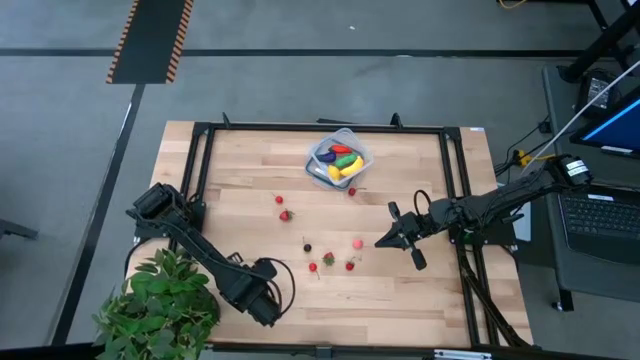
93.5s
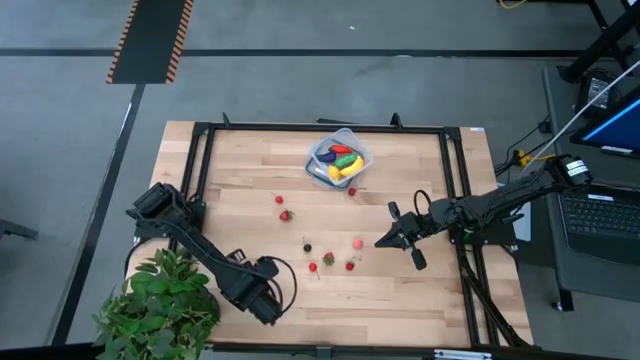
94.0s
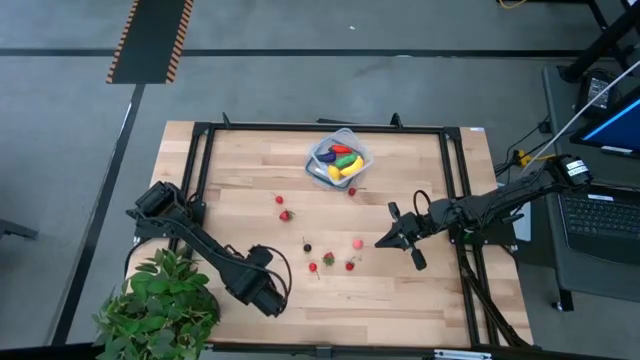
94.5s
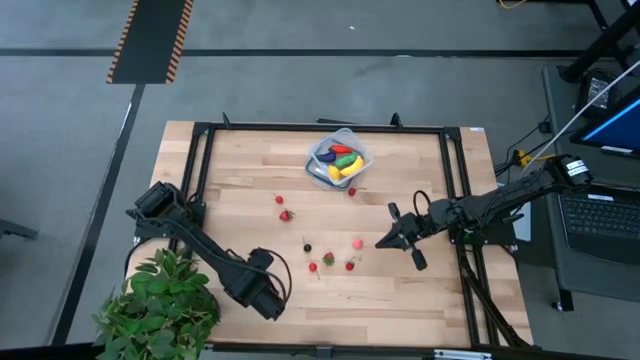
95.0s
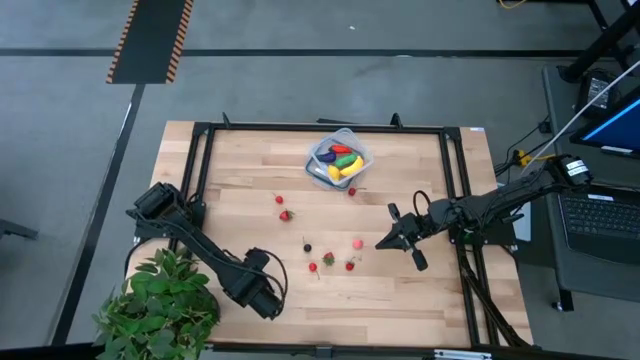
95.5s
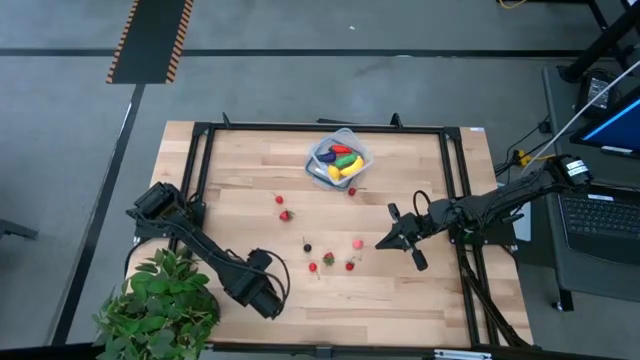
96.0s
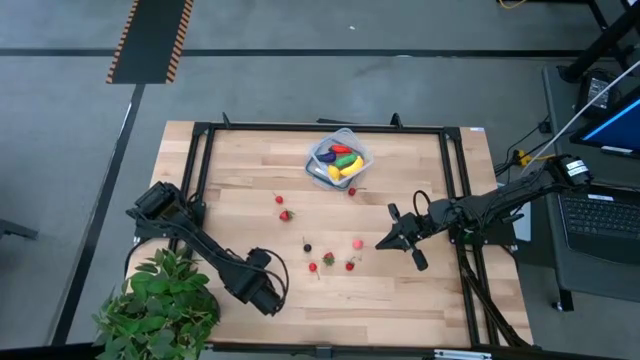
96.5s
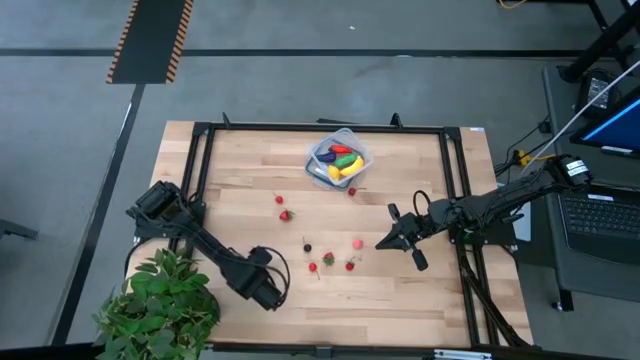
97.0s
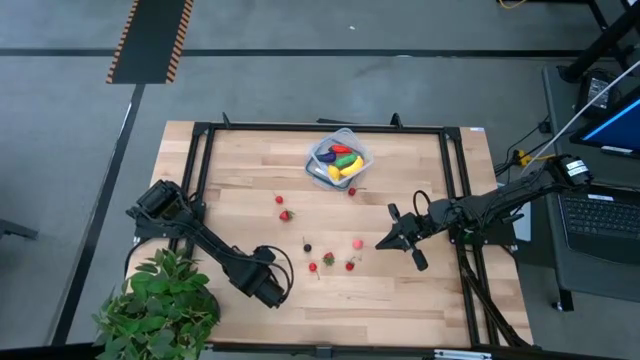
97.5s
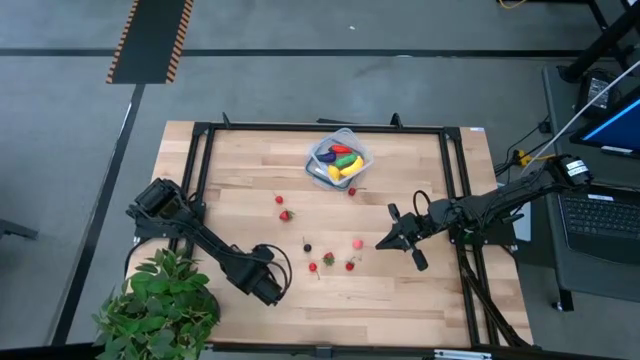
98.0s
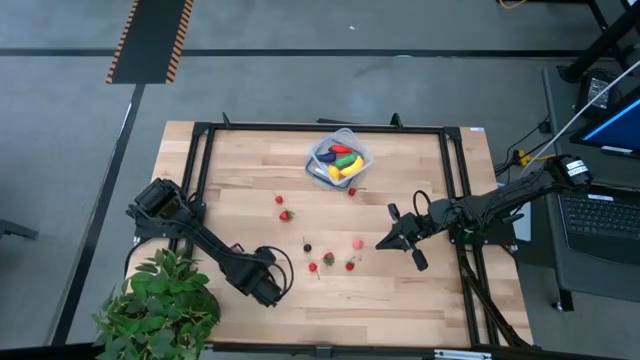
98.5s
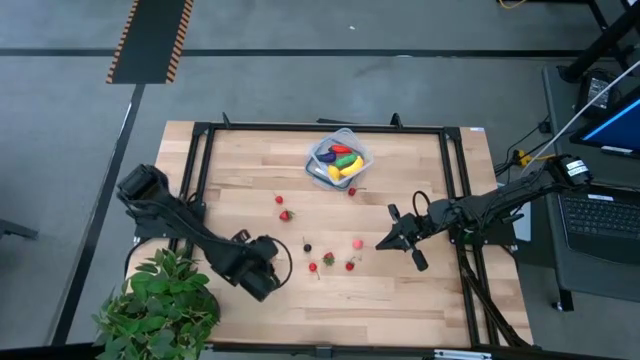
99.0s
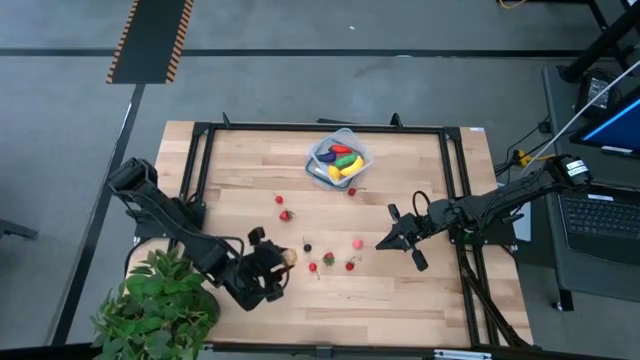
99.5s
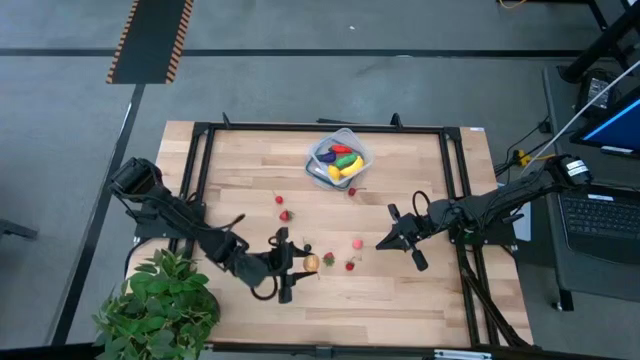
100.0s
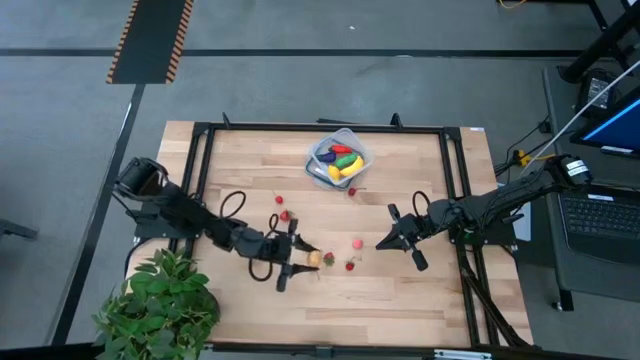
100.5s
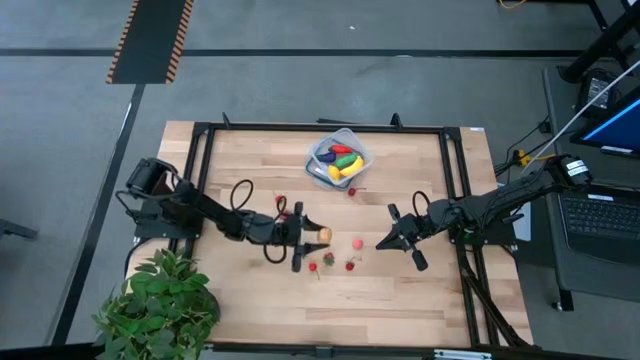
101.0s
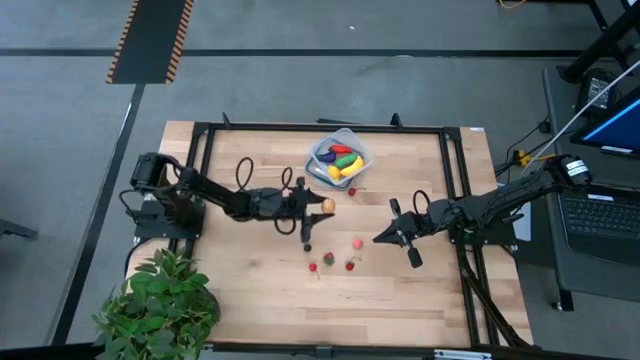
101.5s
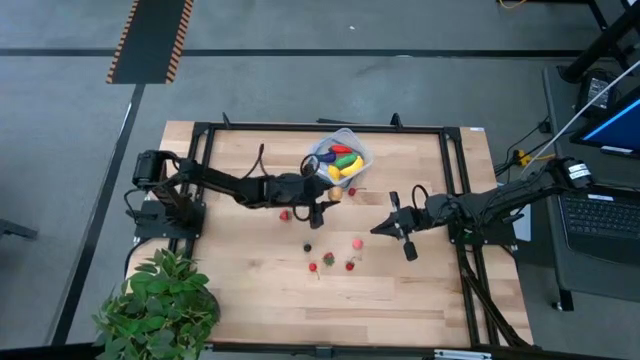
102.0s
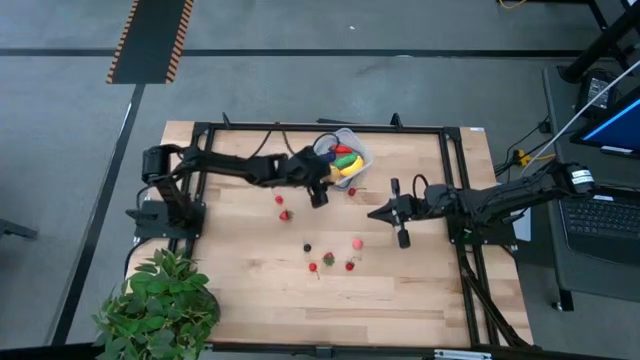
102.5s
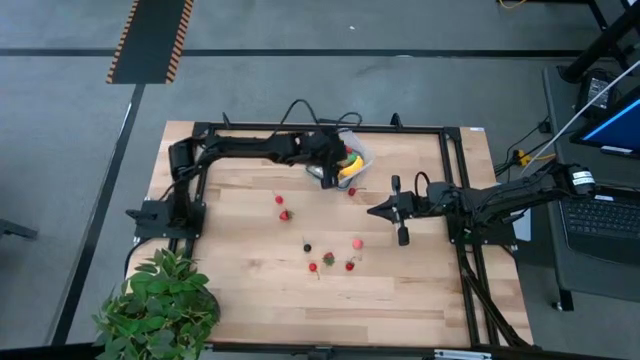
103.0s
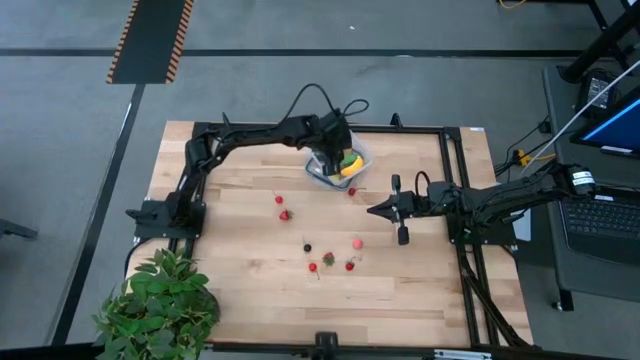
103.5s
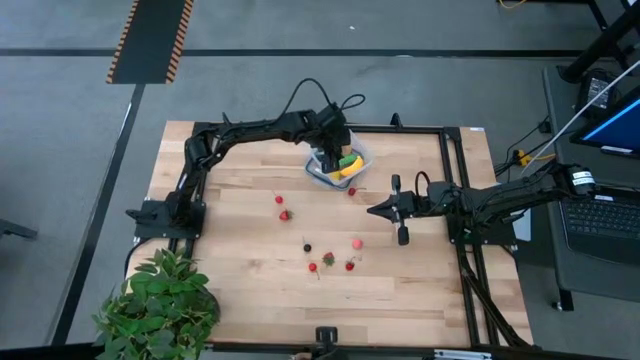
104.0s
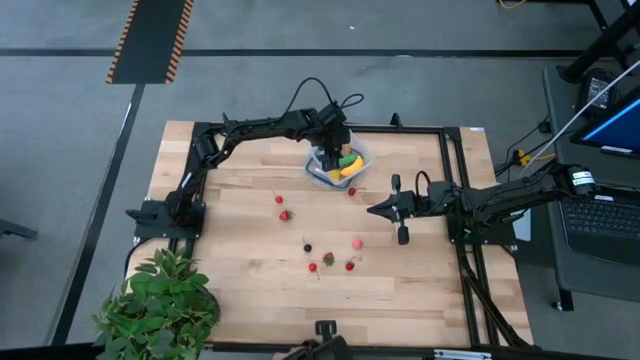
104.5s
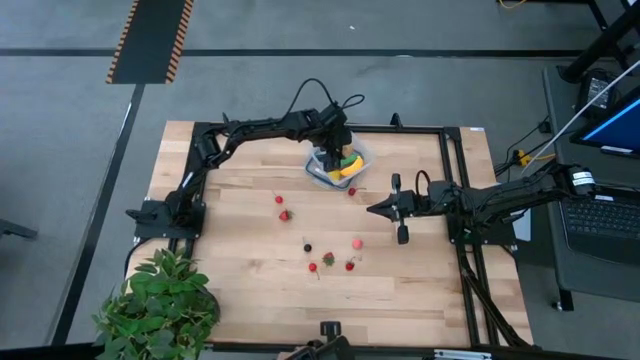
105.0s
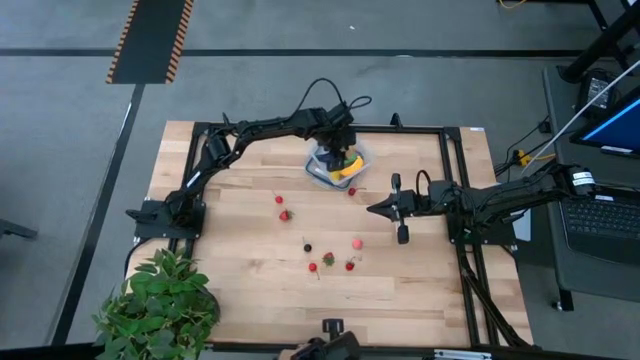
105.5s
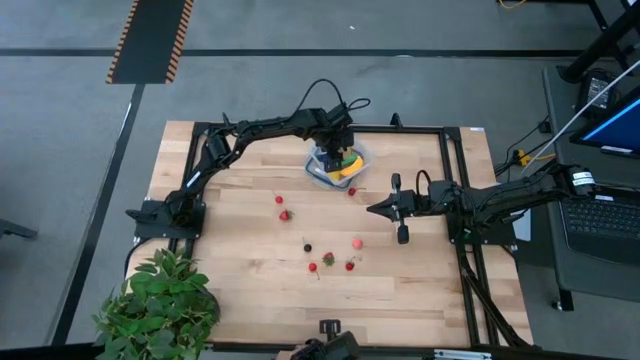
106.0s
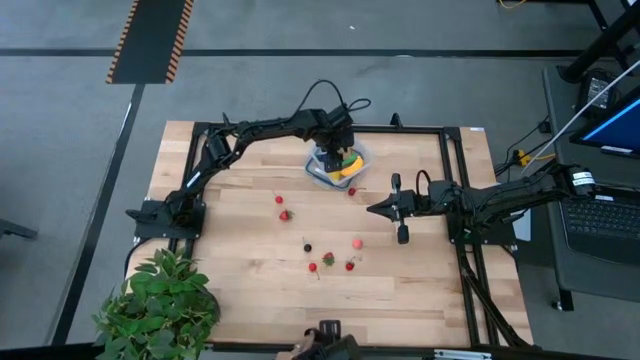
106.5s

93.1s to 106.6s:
Task: Pick and placing Produce into tupperware
Put the brown potato into the transparent container

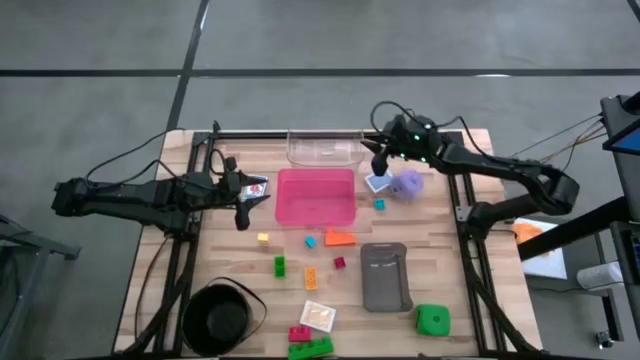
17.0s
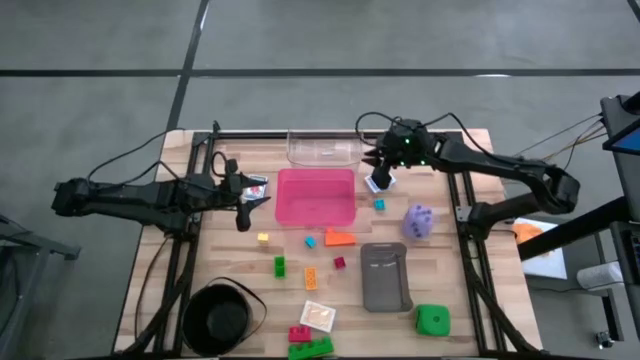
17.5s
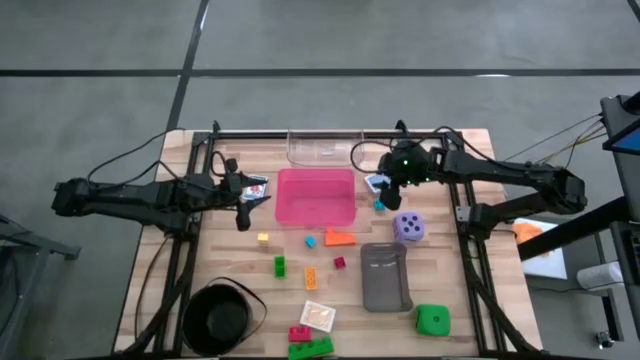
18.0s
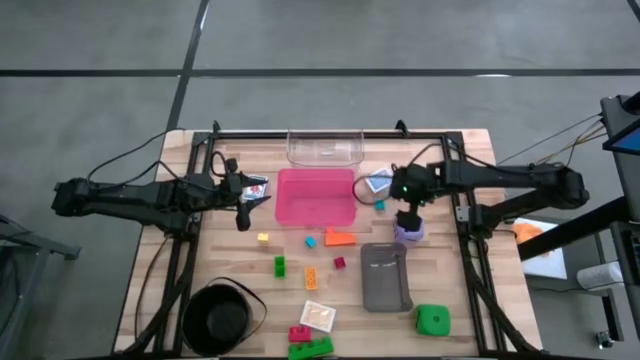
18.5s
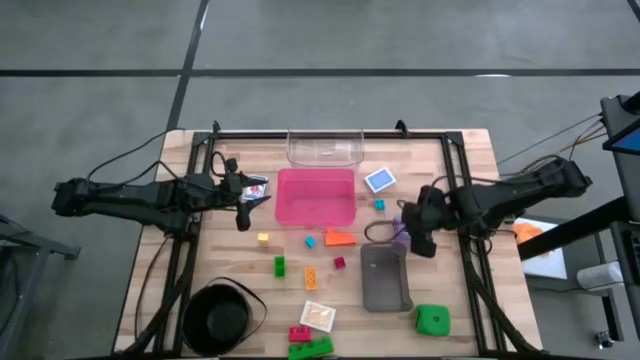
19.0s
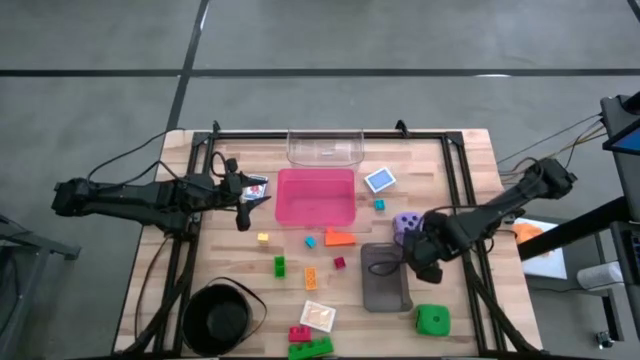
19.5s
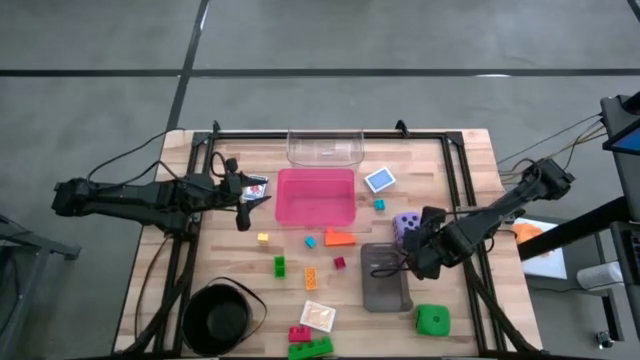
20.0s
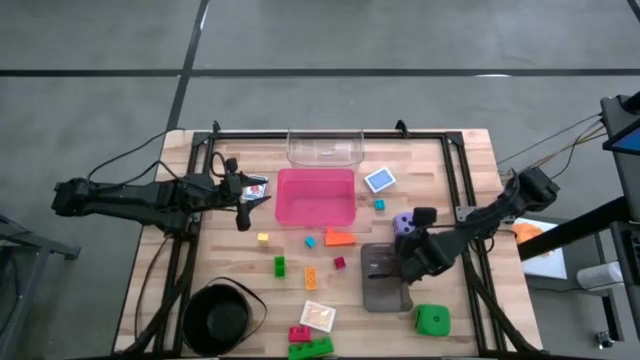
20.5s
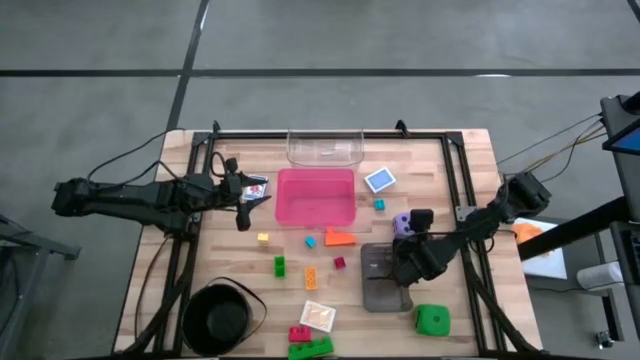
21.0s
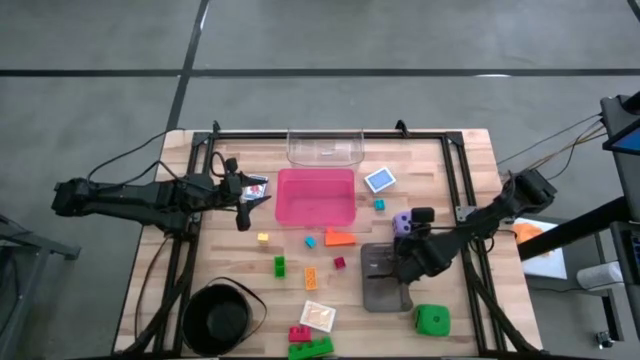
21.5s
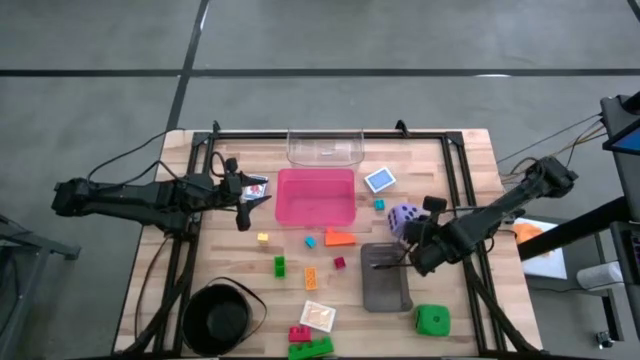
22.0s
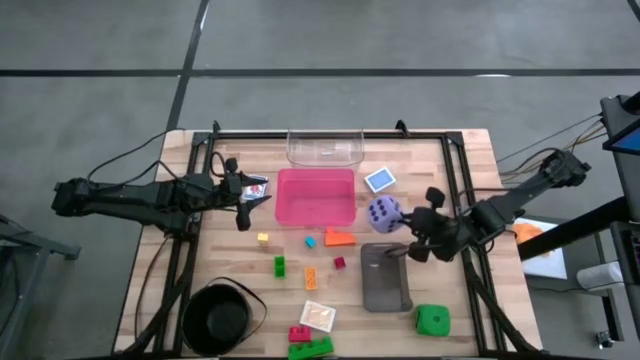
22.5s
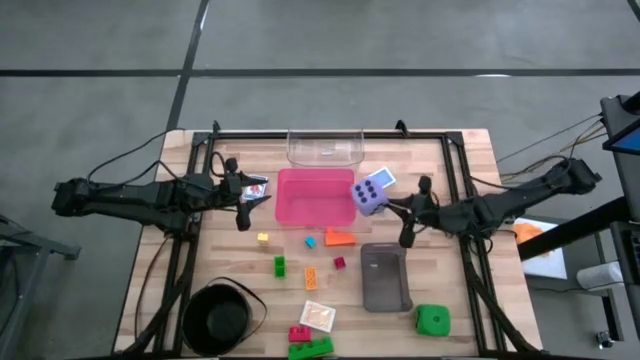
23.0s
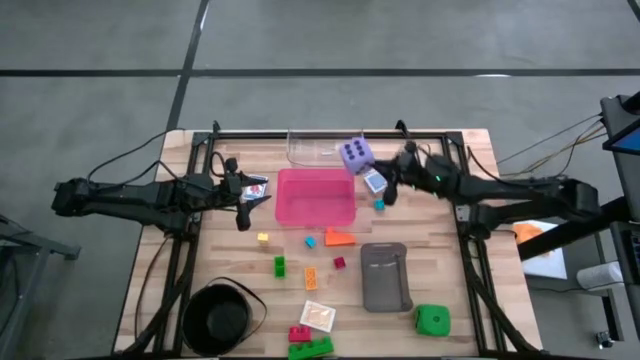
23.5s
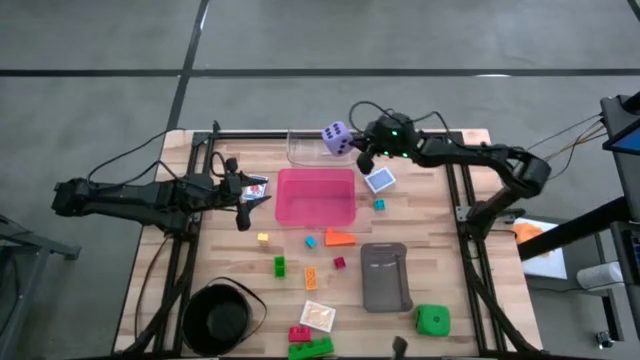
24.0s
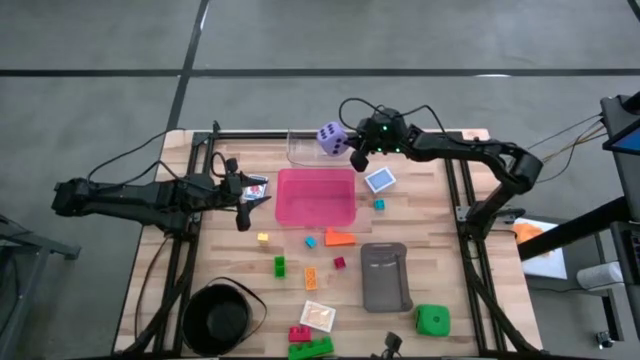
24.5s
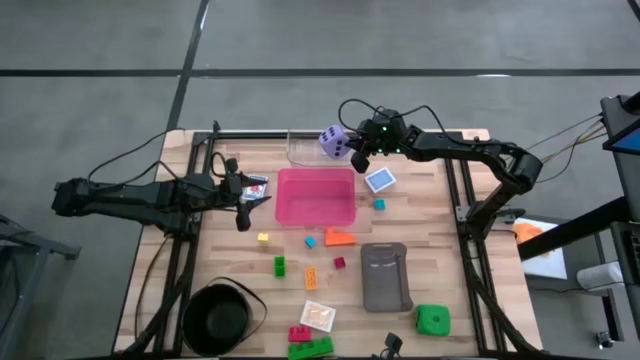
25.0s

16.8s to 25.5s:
Task: Pick & Place Toys
Put the purple dice into the transparent bin
